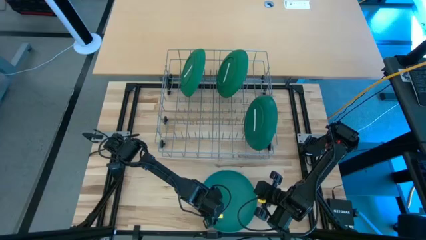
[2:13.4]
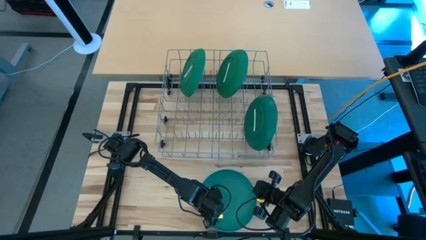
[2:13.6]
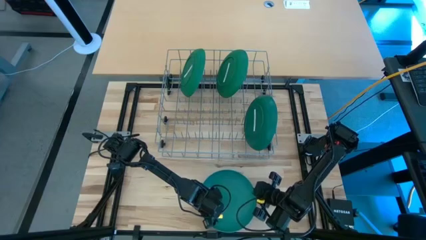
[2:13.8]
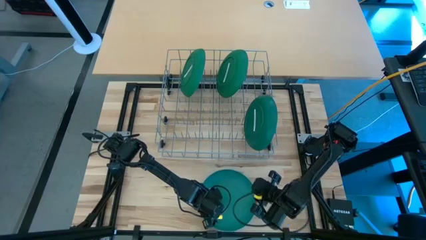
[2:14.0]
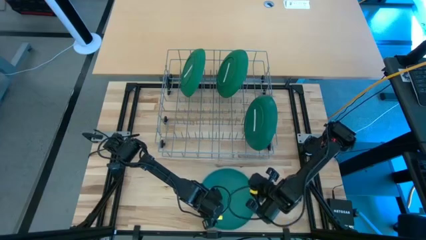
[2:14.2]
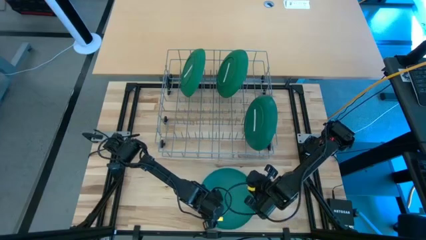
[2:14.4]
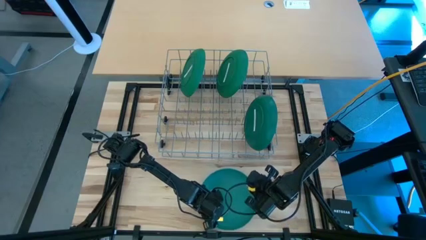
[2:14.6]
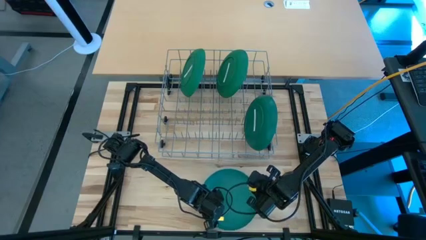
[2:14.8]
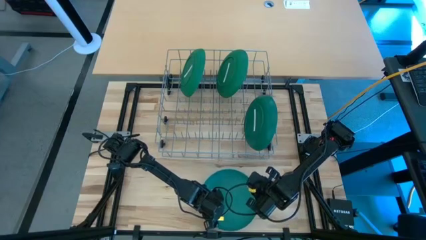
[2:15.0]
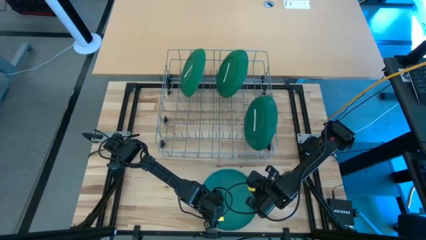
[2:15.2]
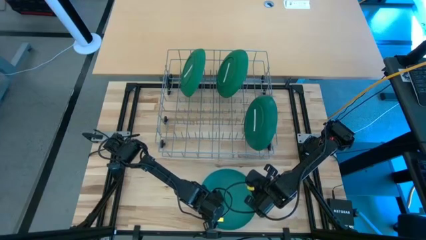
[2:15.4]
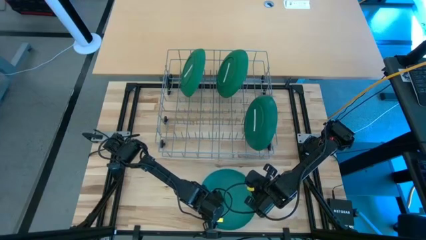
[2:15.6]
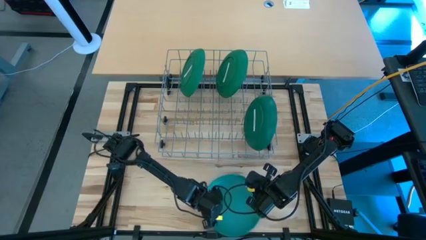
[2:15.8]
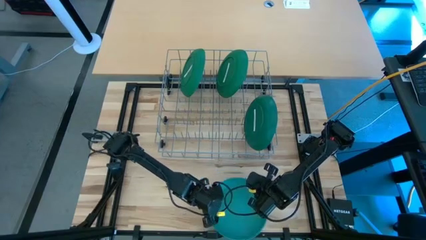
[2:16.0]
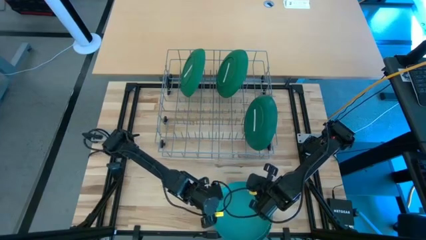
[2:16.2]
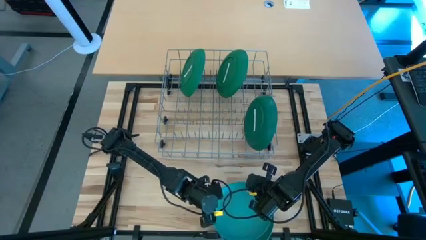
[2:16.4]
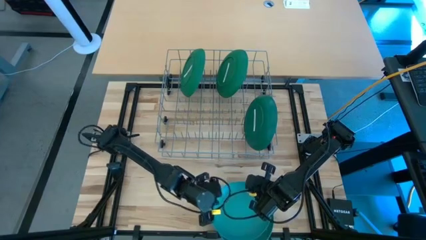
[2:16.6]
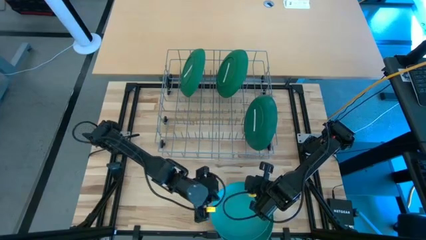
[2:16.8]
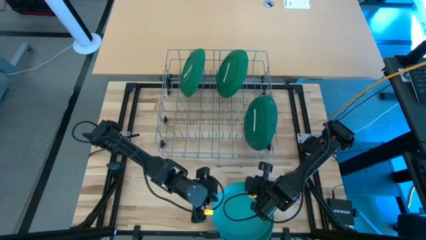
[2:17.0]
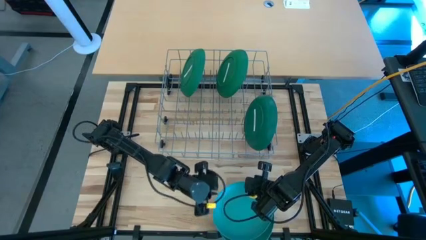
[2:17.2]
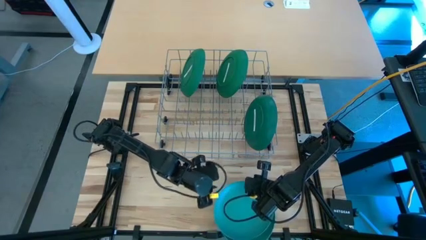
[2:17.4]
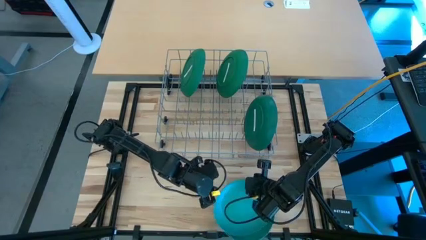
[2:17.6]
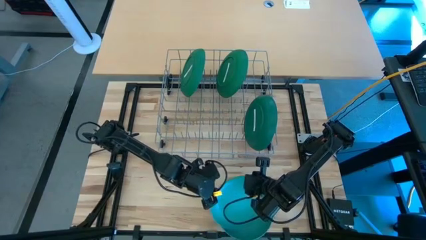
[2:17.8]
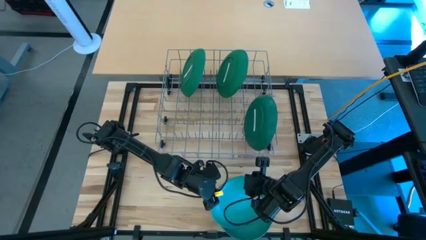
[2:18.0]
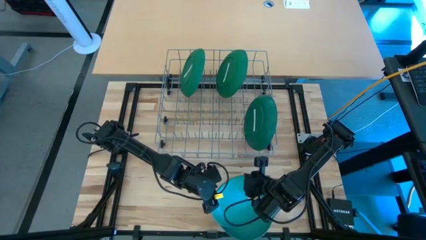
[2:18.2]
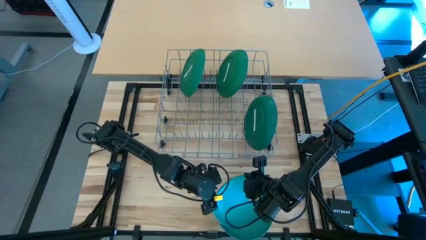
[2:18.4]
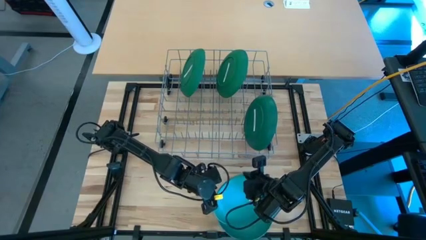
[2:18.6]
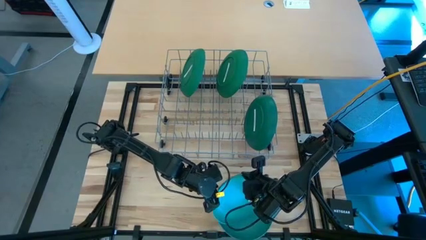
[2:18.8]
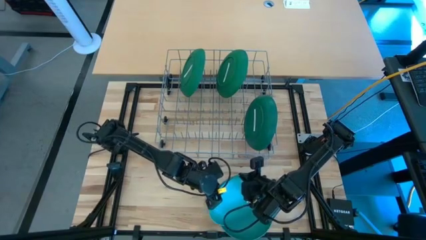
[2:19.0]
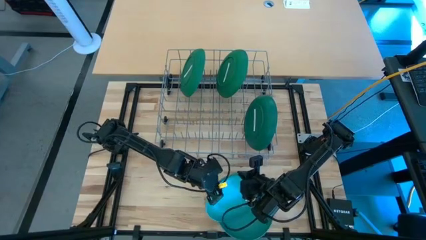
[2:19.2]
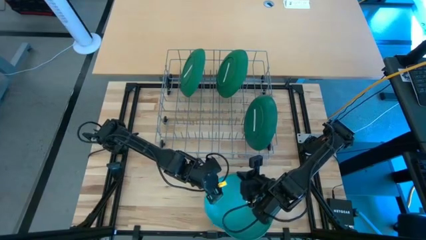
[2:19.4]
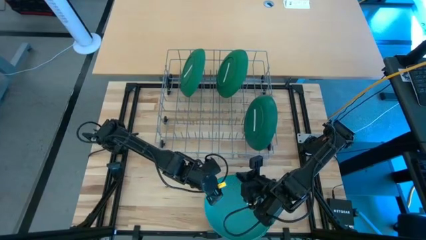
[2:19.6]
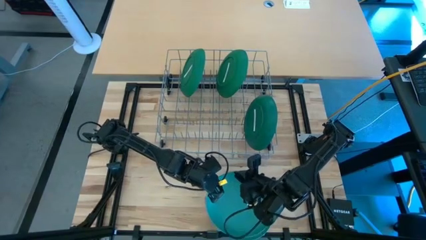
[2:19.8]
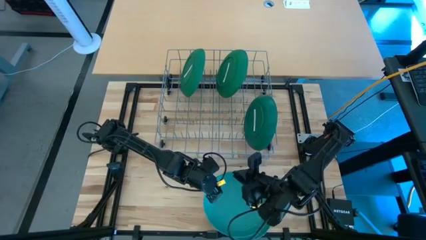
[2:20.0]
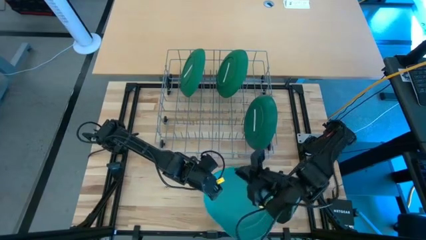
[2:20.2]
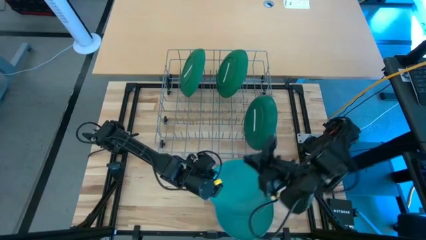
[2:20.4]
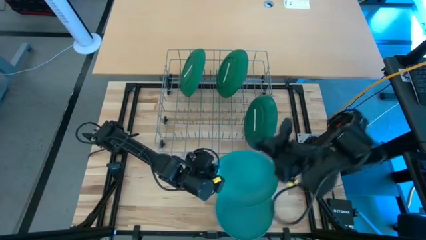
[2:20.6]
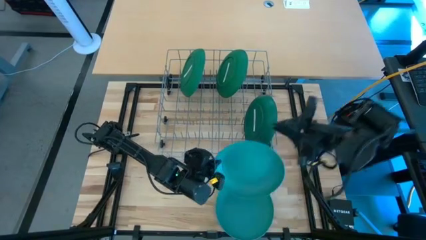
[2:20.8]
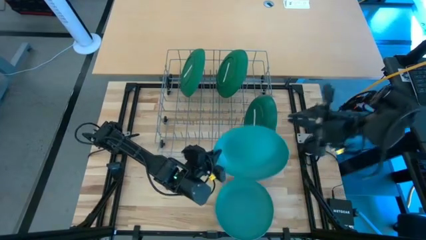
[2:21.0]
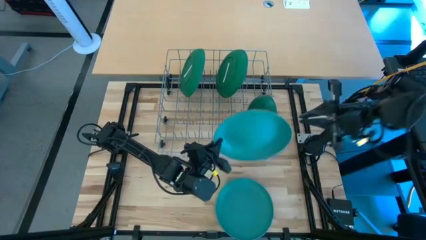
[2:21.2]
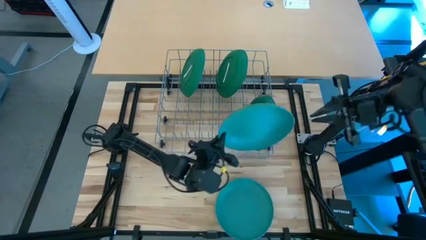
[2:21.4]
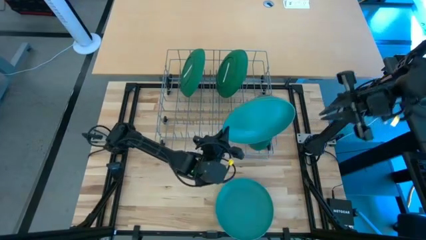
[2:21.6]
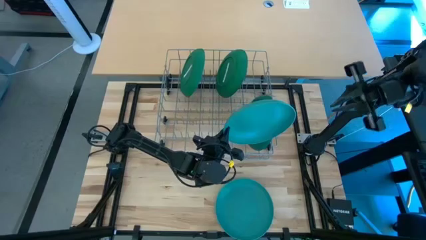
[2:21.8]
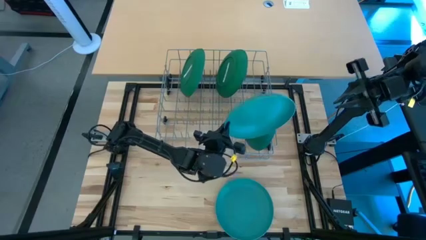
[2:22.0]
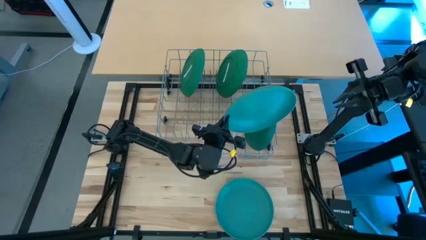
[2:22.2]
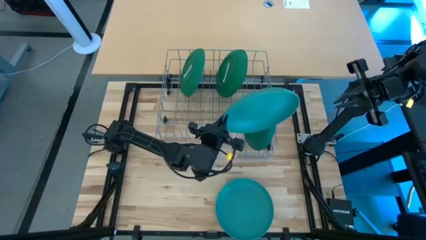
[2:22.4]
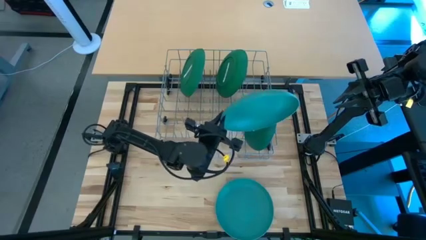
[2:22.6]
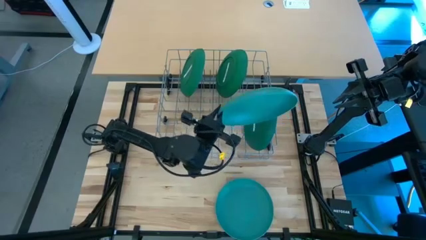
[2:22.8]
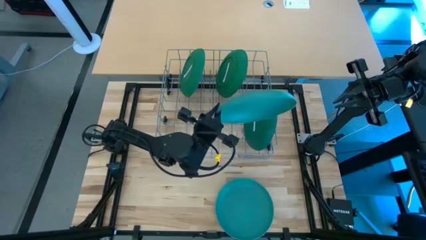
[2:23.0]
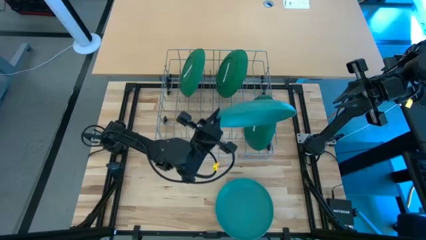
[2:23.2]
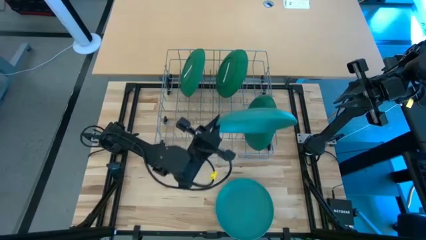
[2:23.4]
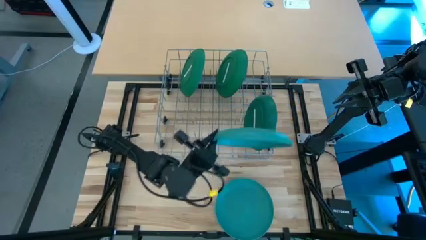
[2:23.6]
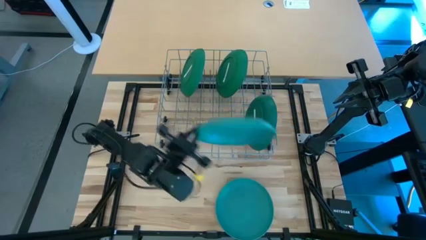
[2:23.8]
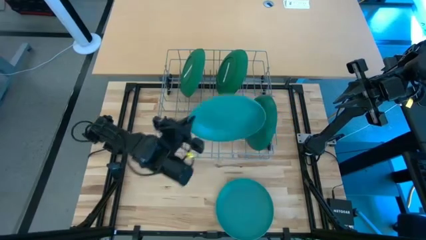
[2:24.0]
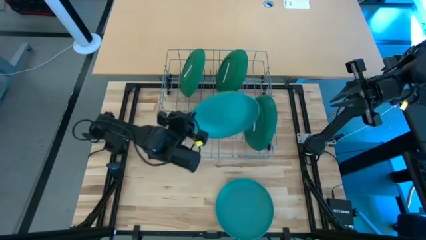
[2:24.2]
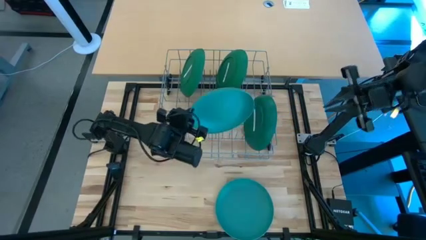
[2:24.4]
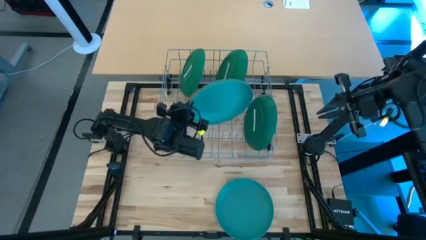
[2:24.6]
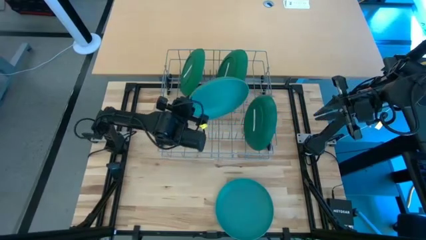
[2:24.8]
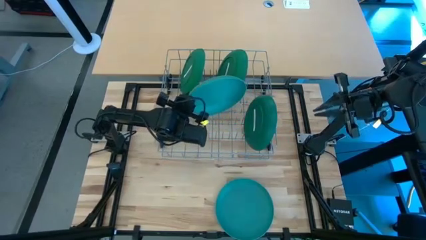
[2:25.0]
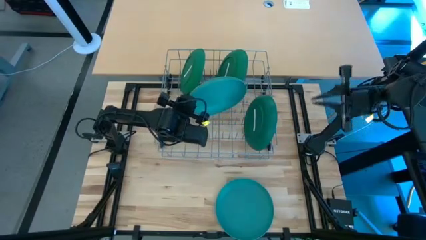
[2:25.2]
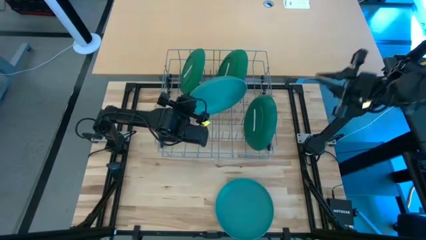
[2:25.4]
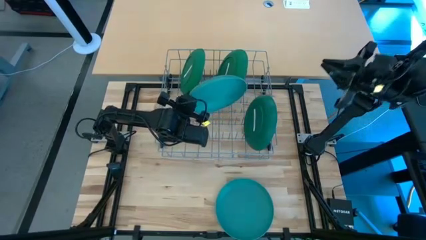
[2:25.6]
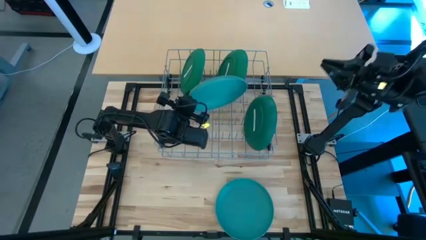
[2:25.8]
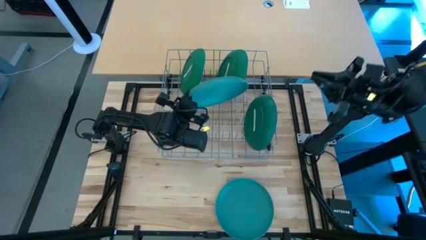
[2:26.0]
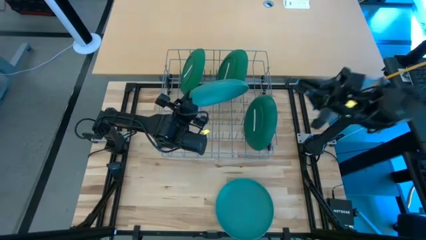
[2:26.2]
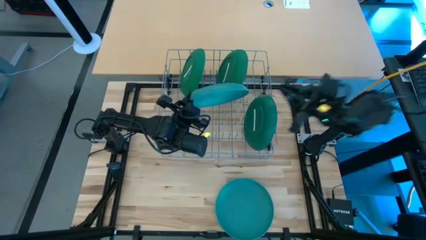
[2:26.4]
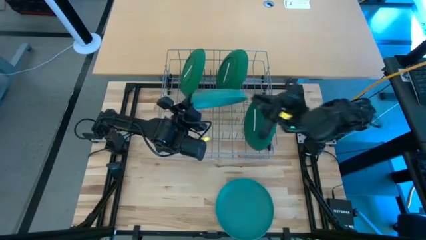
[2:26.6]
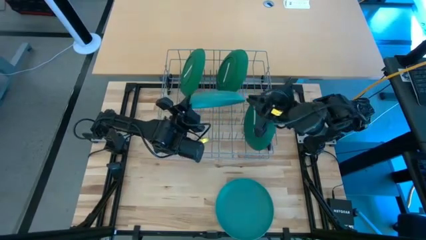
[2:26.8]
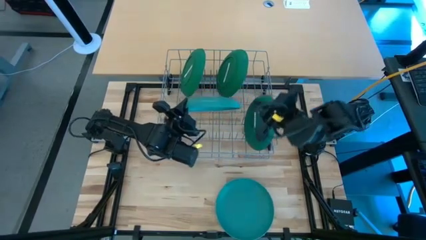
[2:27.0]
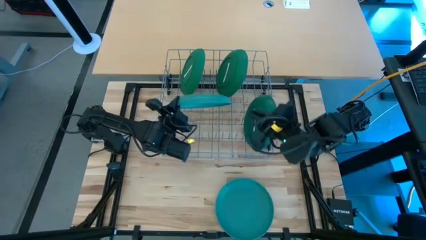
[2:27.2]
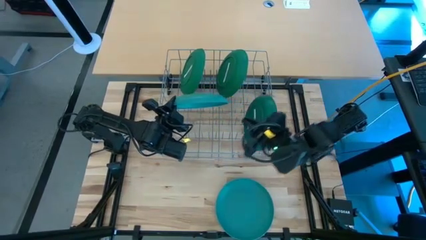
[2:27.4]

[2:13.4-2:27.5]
Task: Sort dishes
Put the top light green plate in the dish rack
